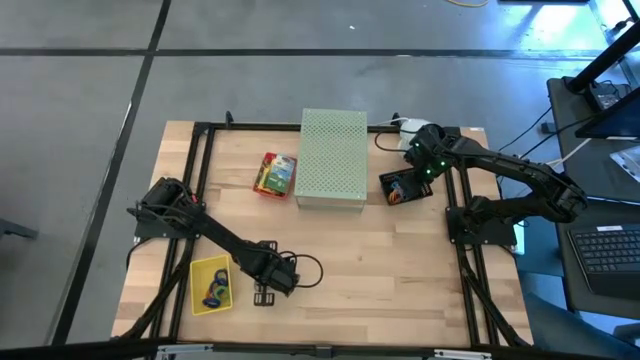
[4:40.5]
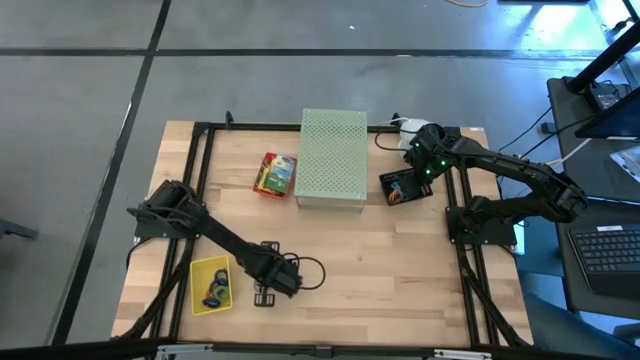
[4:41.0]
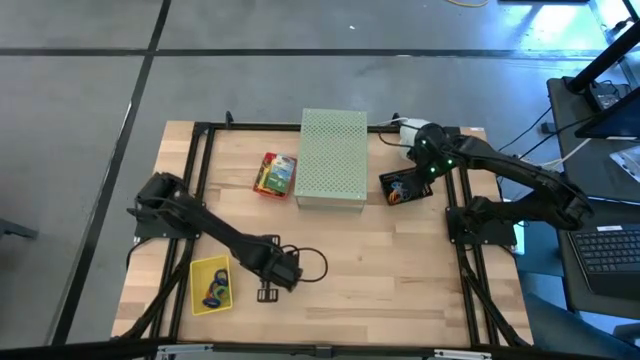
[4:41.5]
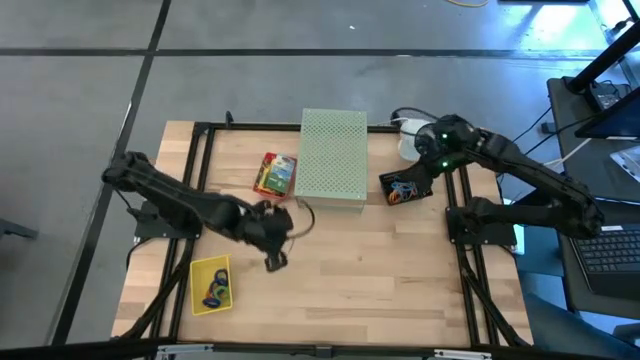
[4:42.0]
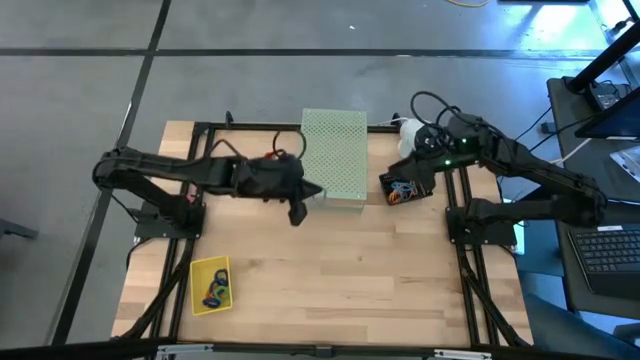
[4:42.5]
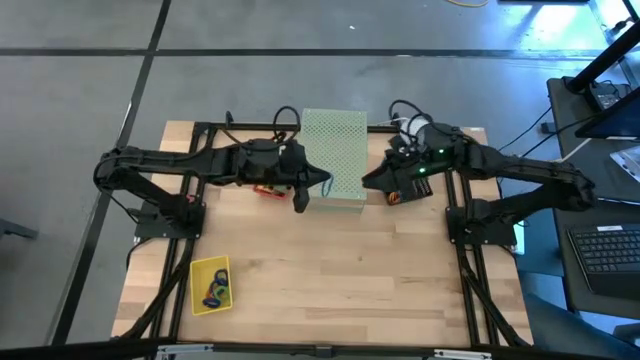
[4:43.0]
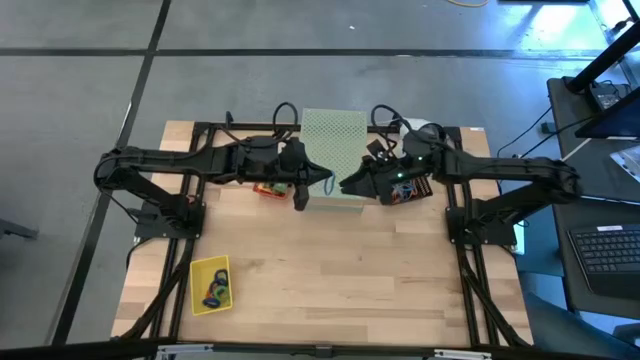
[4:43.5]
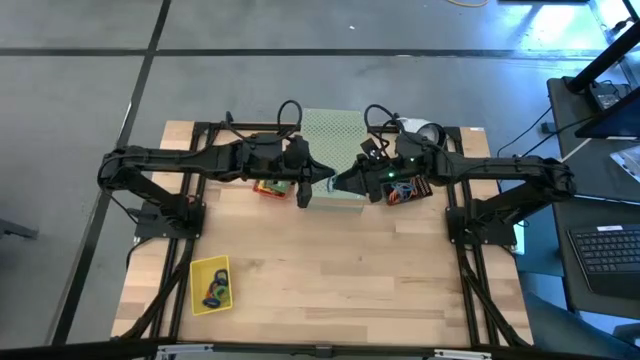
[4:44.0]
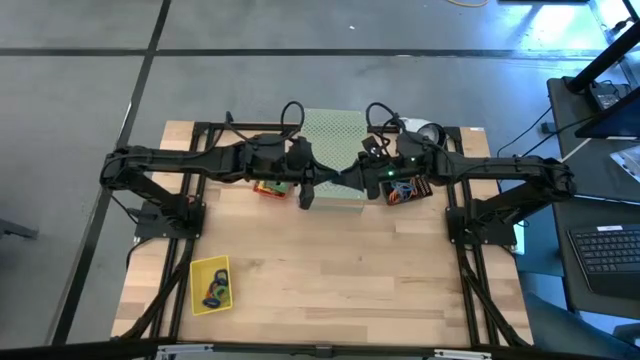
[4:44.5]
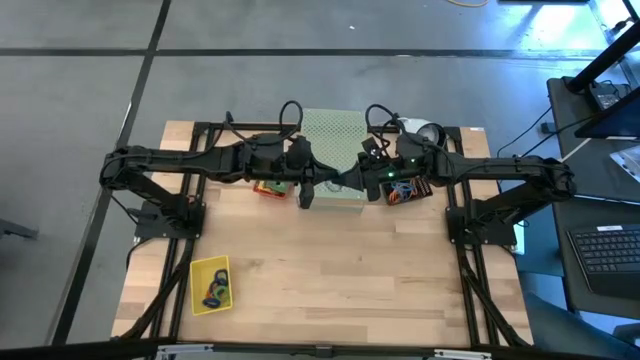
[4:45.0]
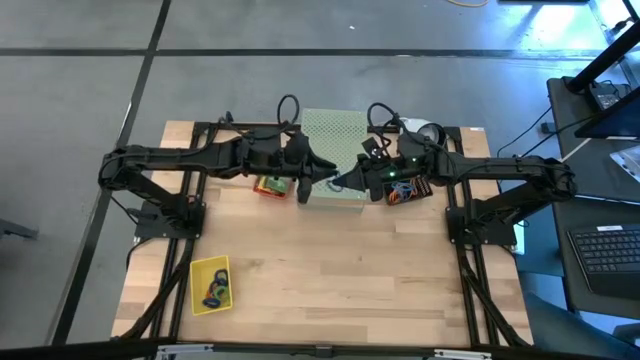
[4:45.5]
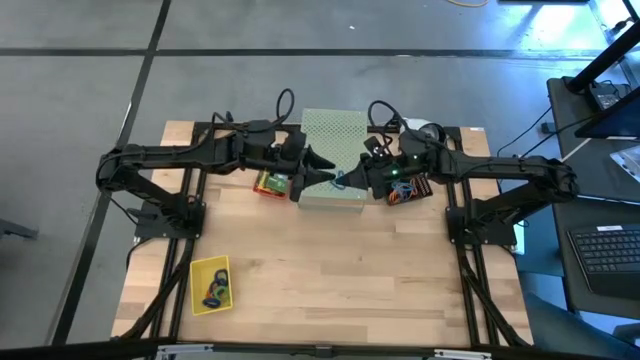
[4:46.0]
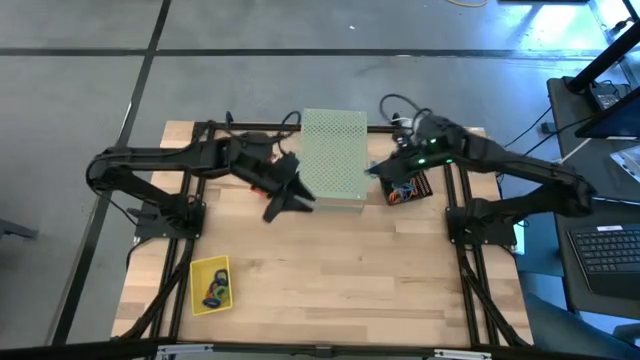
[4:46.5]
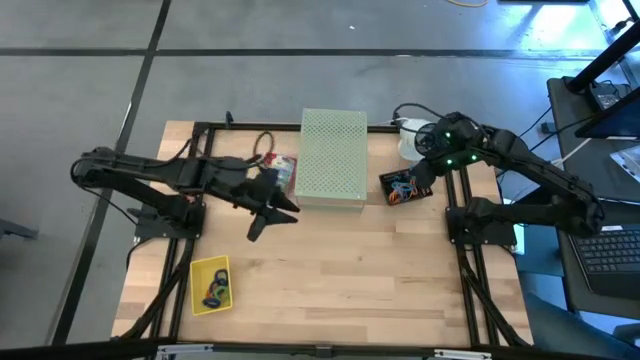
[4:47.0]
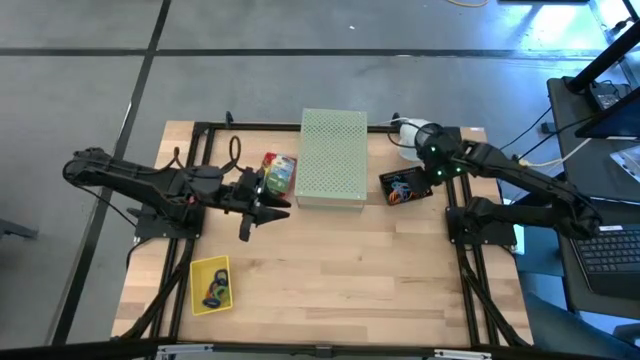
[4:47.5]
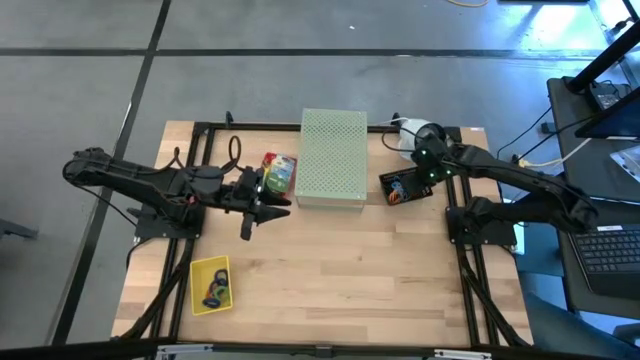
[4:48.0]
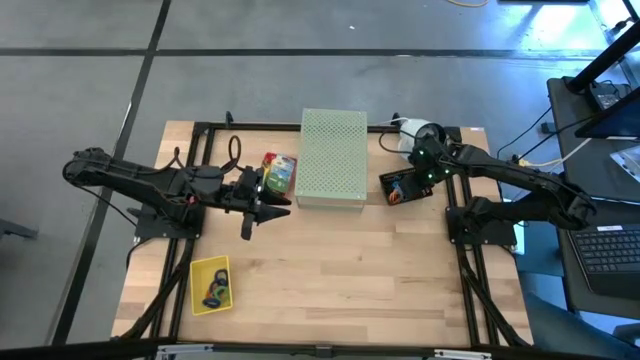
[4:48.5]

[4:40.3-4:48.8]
Task: Pick & Place Office Desk Supplies
Put the blue rubber band into the black bin

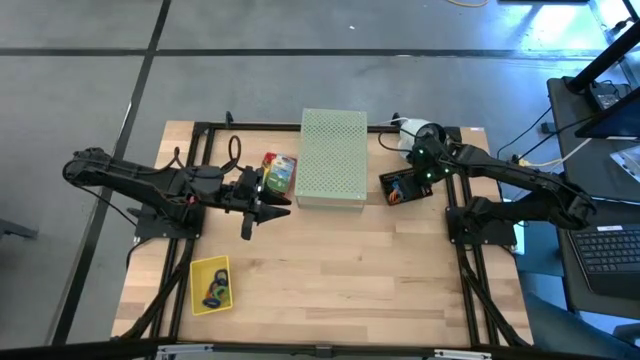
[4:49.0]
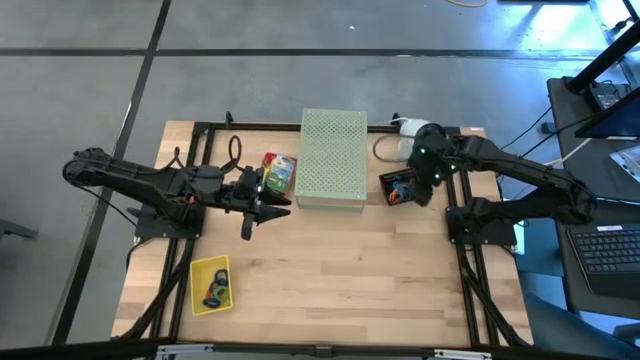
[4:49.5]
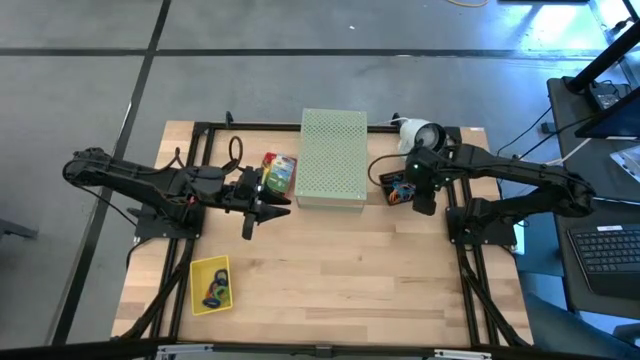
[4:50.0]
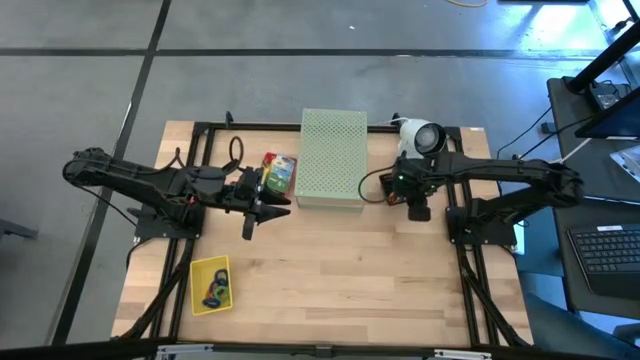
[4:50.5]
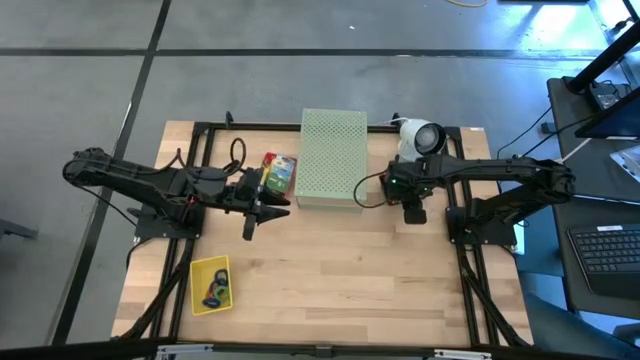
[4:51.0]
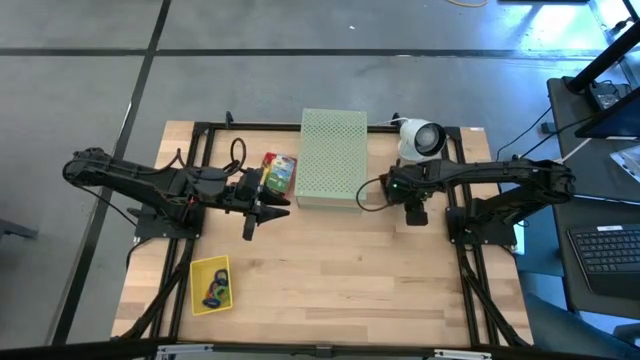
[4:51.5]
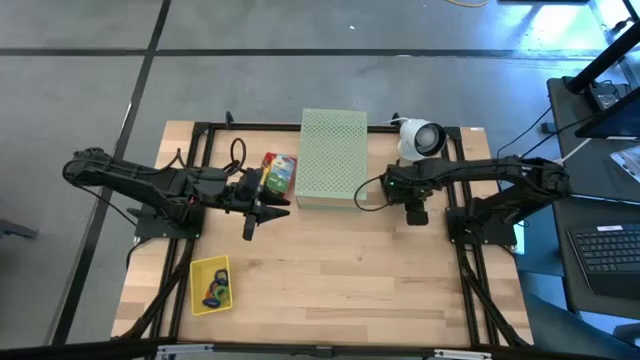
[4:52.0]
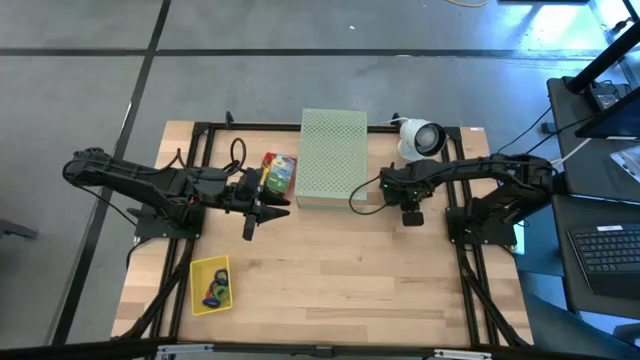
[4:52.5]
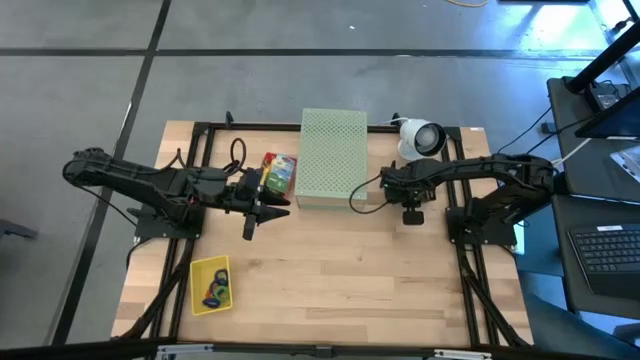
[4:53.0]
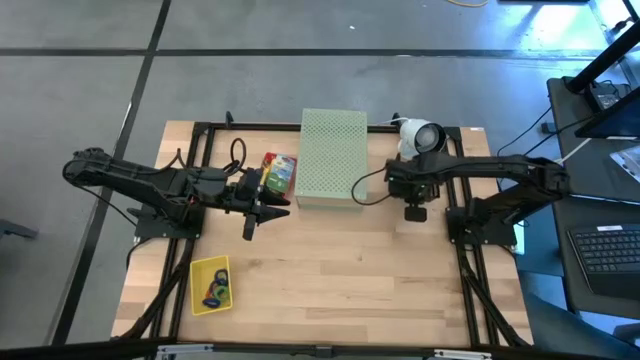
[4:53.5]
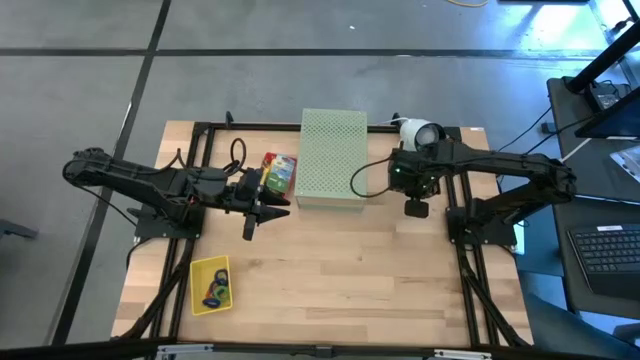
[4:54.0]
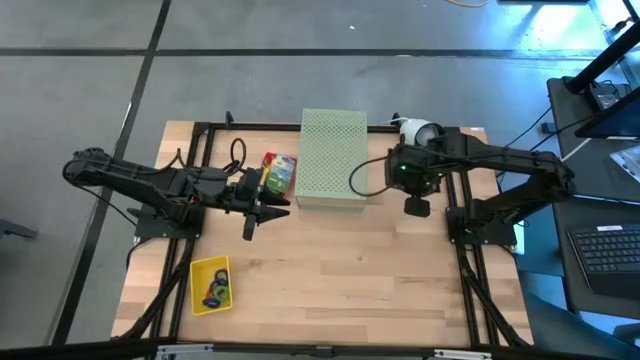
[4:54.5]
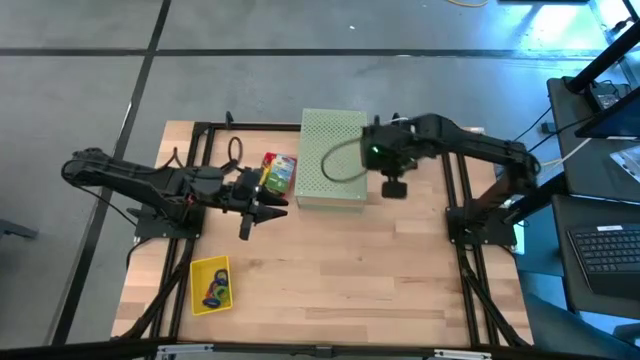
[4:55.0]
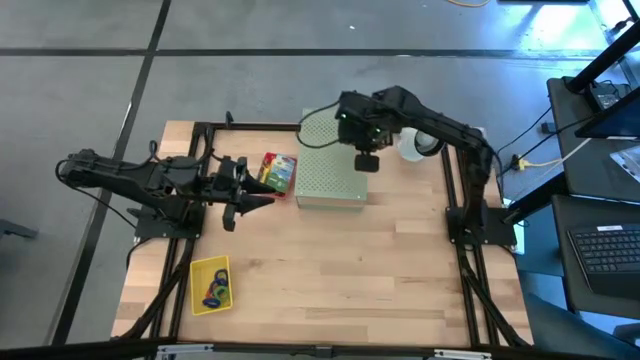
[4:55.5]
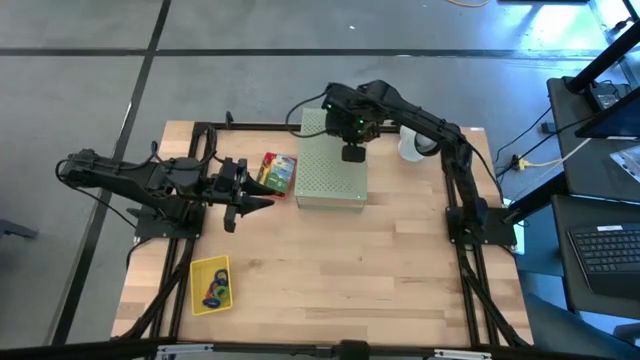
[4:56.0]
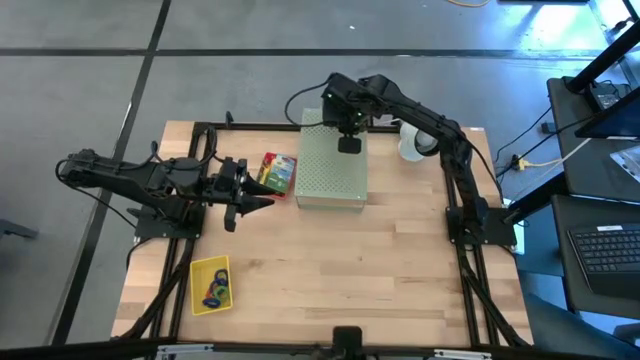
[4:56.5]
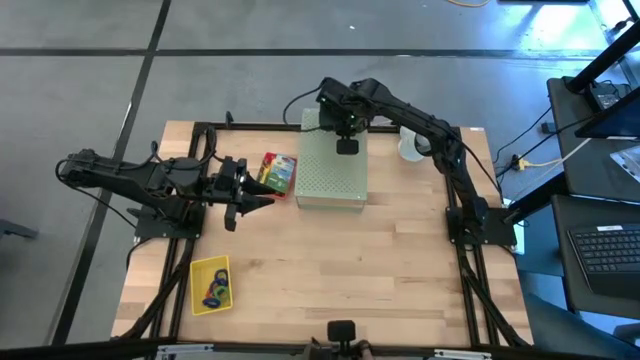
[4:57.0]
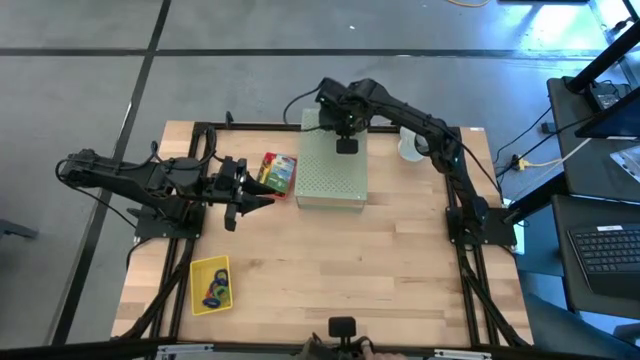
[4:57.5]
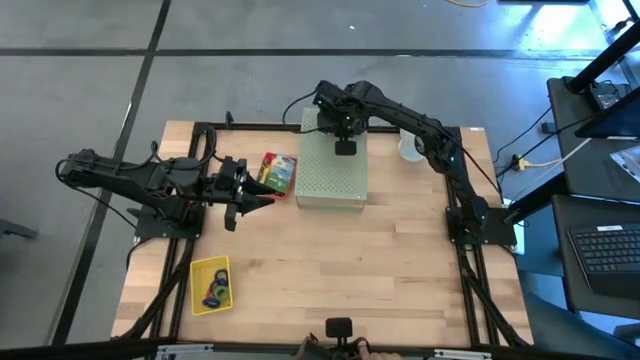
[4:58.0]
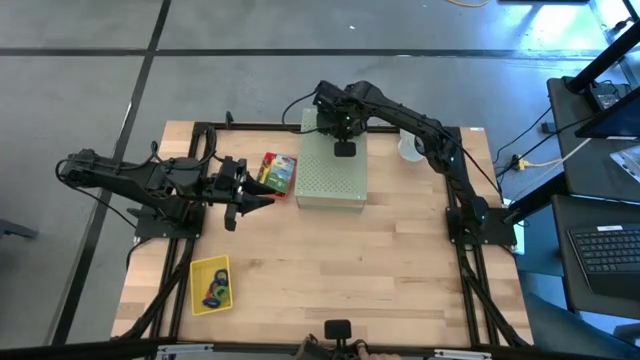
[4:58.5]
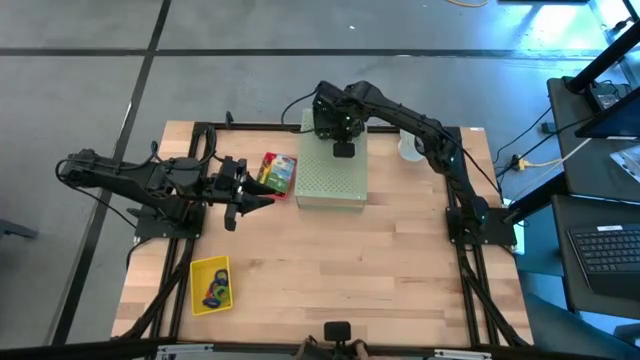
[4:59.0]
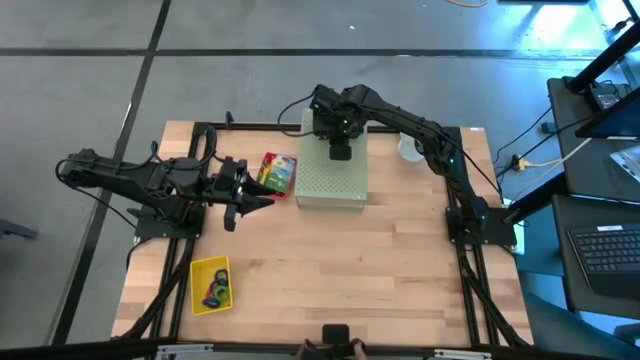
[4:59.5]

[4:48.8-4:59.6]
Put the black bin on the shelf
